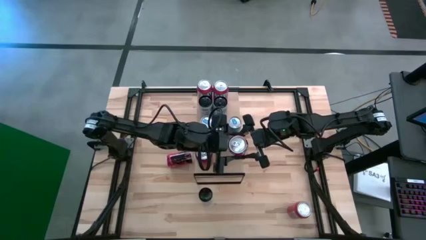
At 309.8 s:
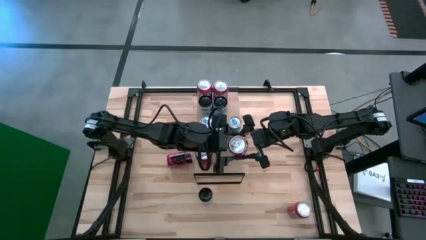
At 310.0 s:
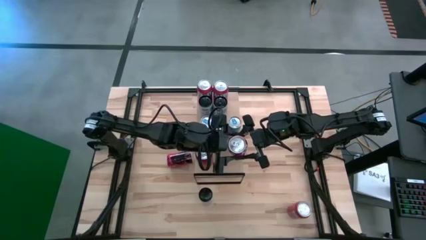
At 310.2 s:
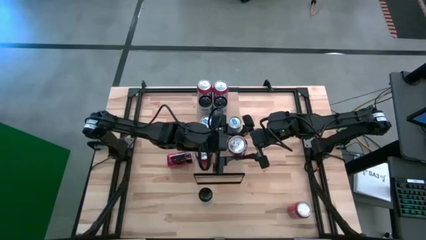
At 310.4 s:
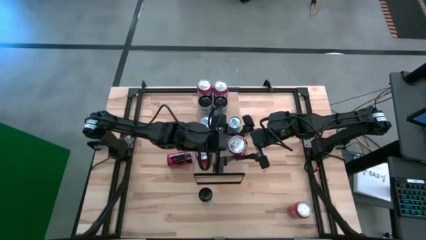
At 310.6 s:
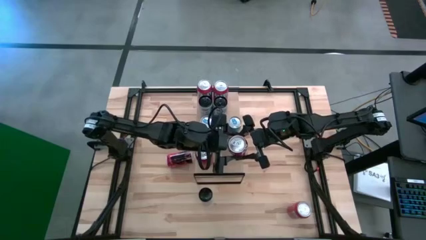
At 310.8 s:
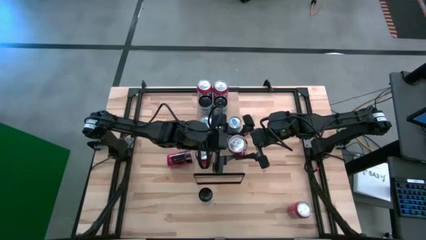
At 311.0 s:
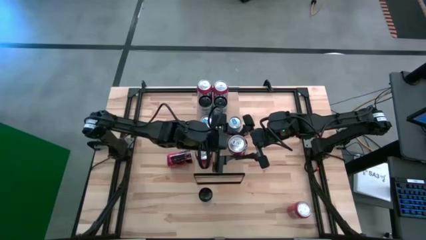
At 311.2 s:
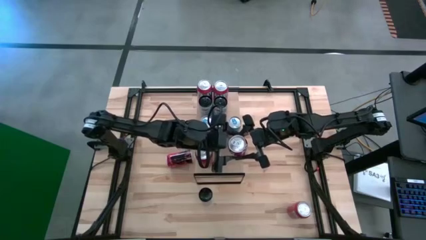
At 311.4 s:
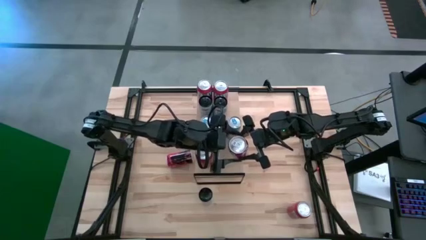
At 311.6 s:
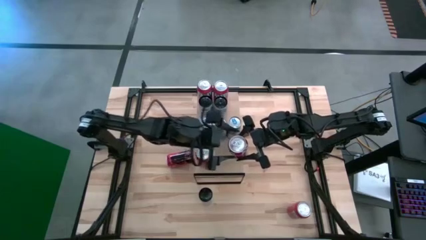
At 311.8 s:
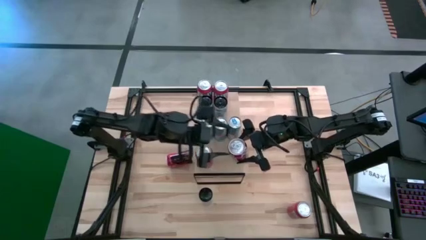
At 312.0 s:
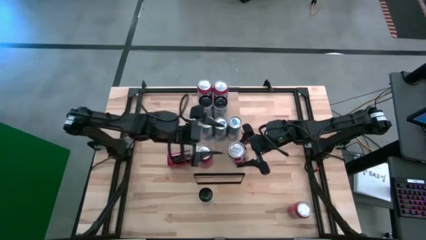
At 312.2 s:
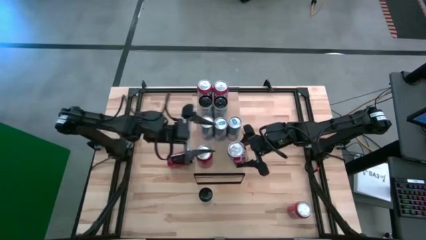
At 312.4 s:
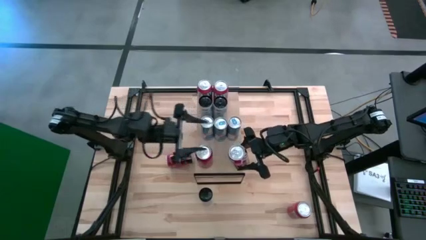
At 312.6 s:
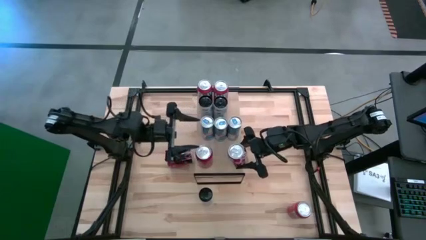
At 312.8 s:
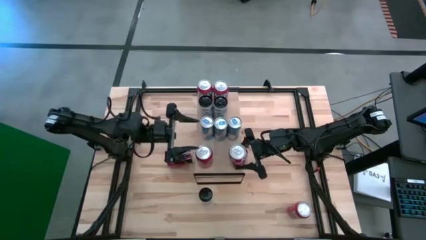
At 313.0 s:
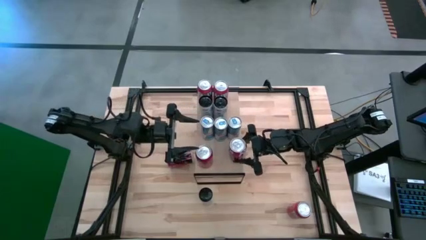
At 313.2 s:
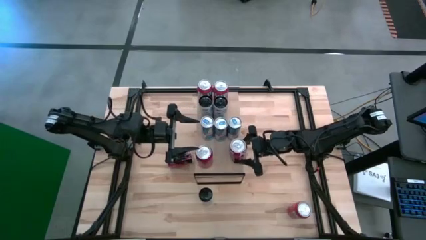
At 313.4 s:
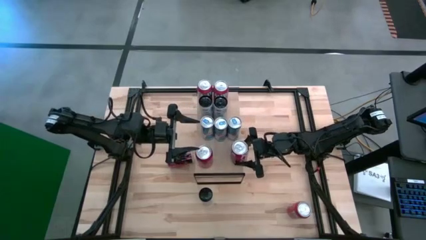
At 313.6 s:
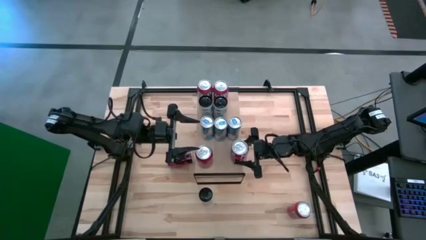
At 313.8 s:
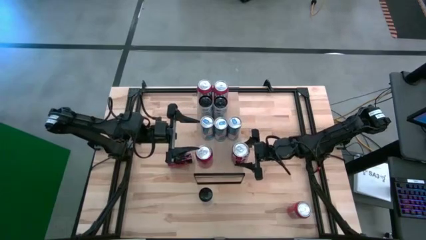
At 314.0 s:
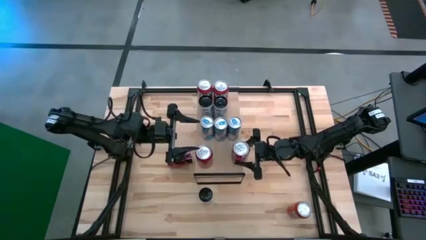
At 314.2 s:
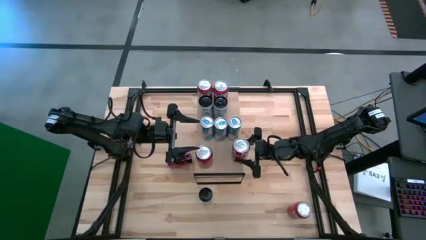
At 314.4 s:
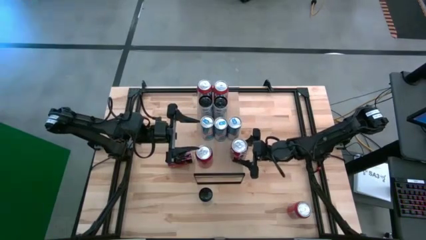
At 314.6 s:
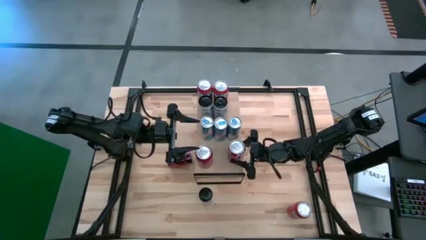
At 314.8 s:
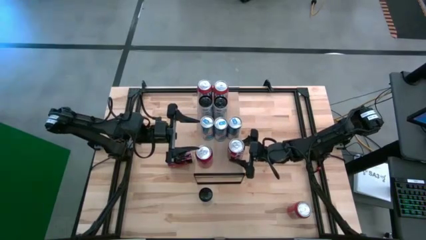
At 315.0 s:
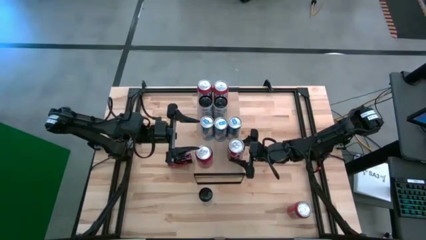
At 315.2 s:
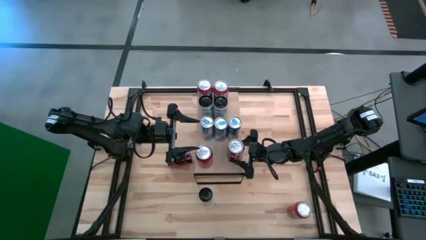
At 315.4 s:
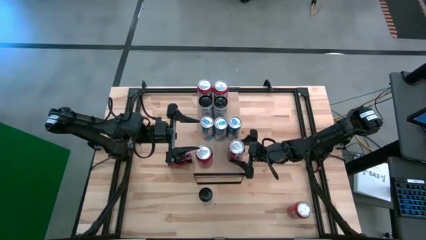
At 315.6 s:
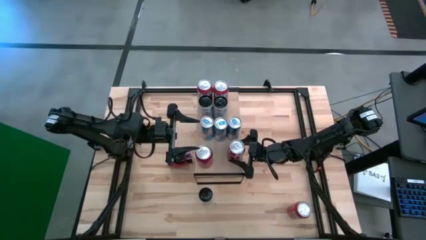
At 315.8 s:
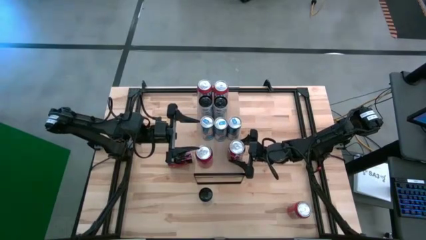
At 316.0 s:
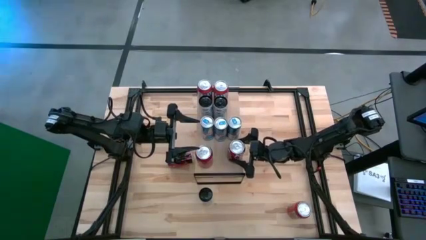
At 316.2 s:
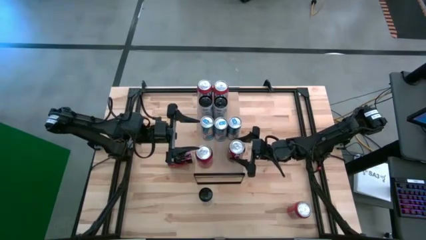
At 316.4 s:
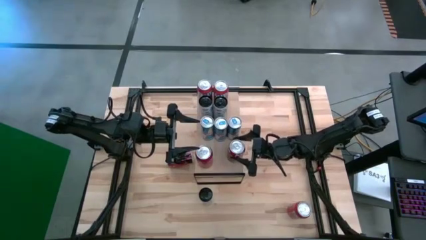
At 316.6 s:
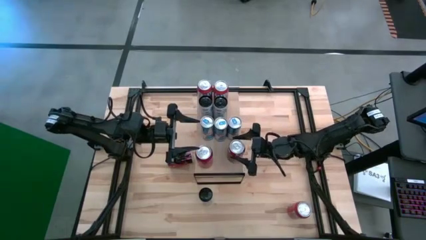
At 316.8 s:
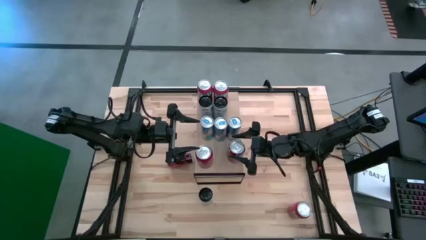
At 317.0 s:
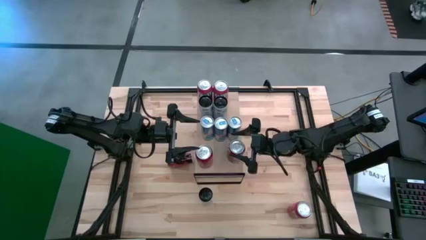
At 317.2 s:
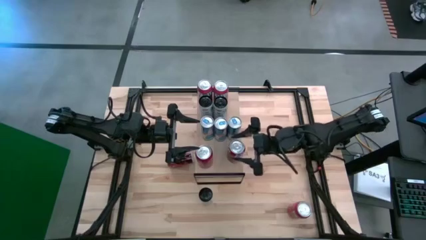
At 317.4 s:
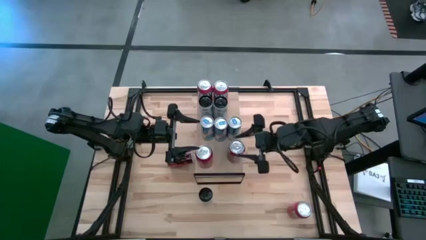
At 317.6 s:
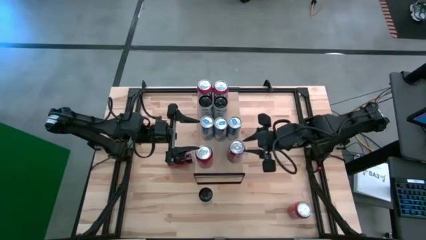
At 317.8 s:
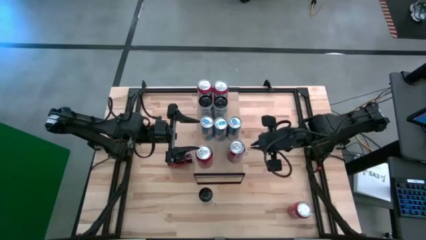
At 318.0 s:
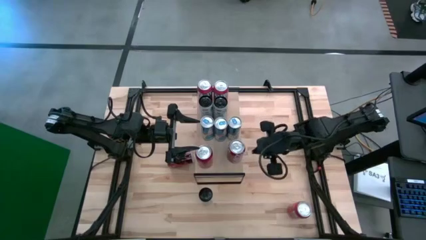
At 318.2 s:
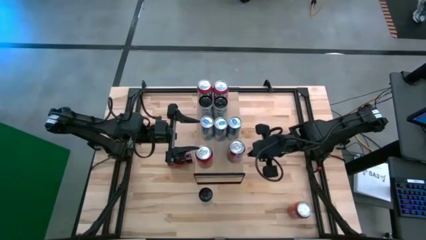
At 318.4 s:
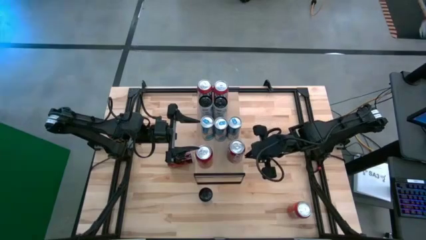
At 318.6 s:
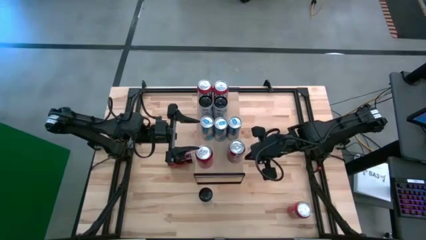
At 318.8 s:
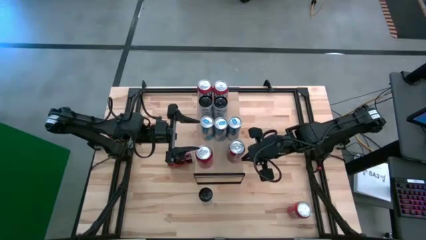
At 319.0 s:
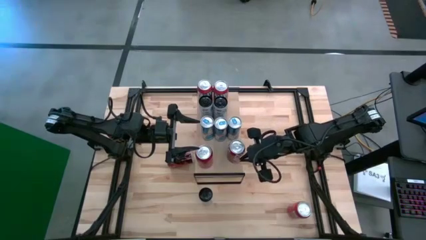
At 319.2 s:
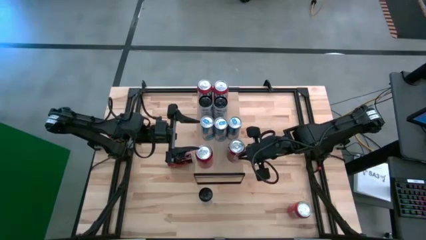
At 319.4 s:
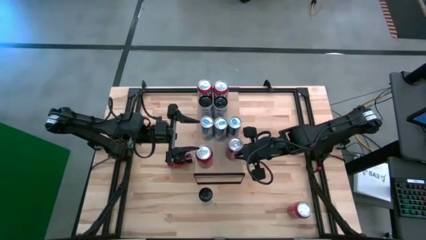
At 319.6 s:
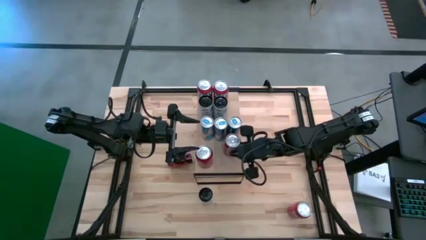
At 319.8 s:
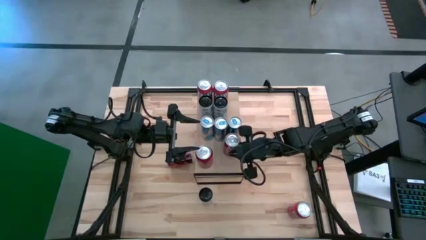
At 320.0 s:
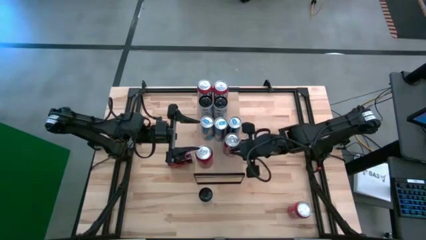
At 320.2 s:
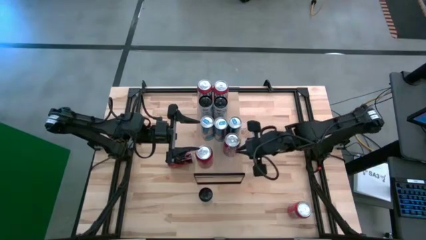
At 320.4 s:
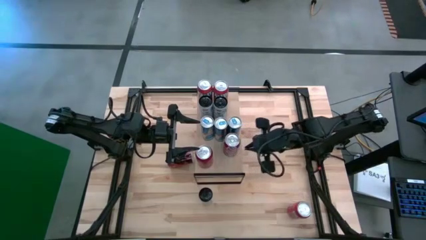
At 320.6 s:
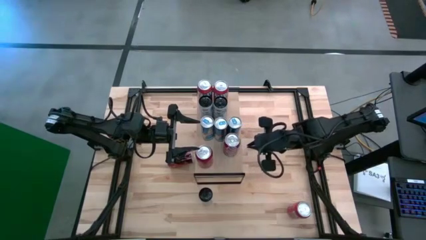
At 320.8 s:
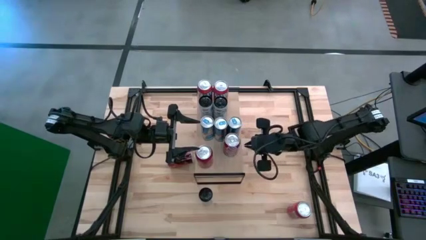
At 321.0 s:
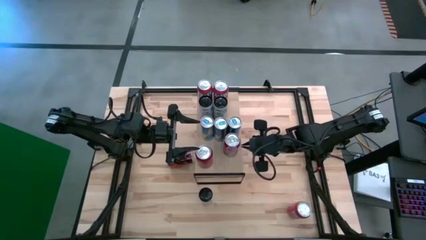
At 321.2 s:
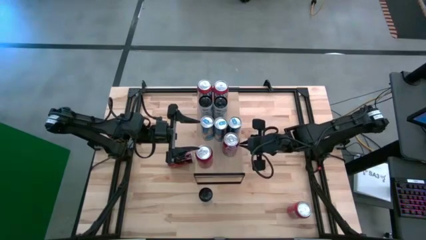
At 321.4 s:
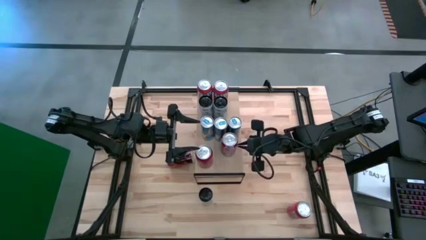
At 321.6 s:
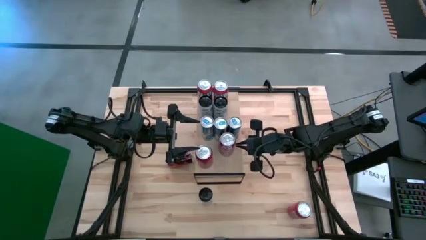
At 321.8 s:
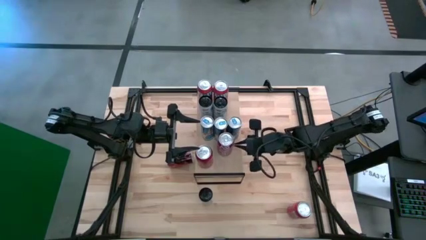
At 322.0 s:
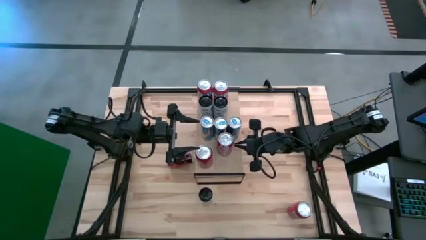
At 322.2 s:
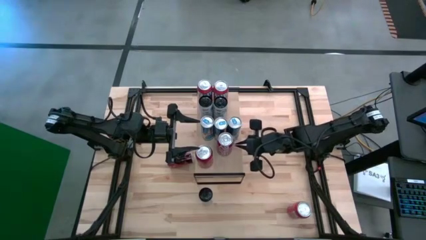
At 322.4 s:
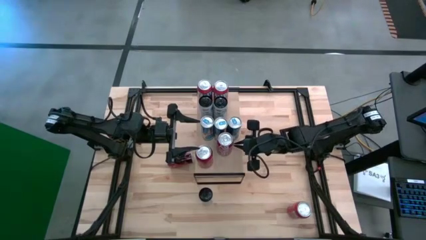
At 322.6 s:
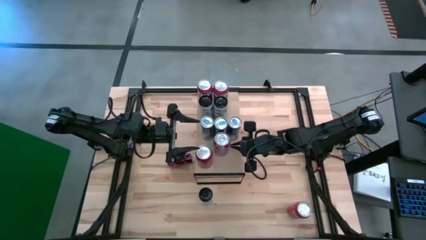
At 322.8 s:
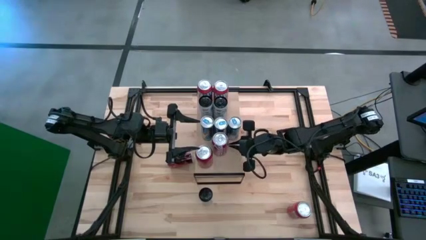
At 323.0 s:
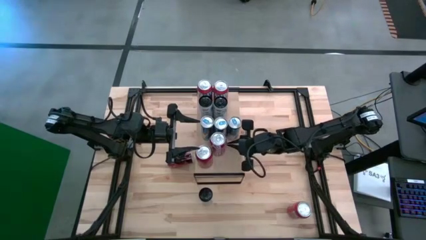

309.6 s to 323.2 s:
Task: Place canned beverage on shelf
Put the red white soda can on the shelf
